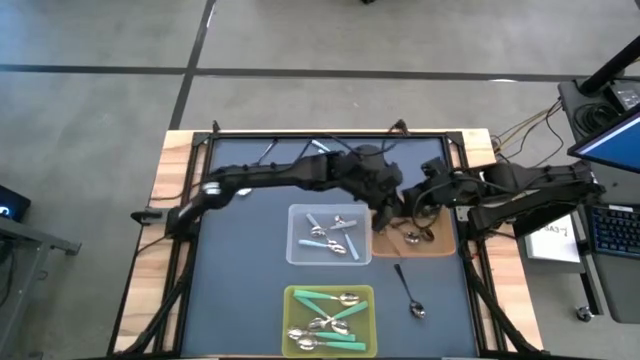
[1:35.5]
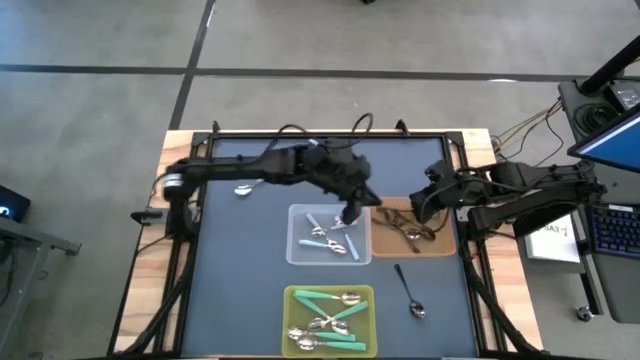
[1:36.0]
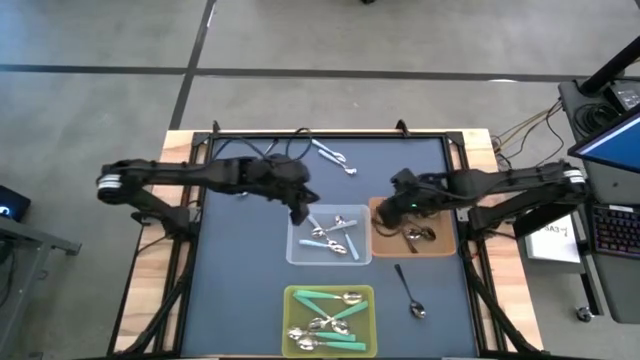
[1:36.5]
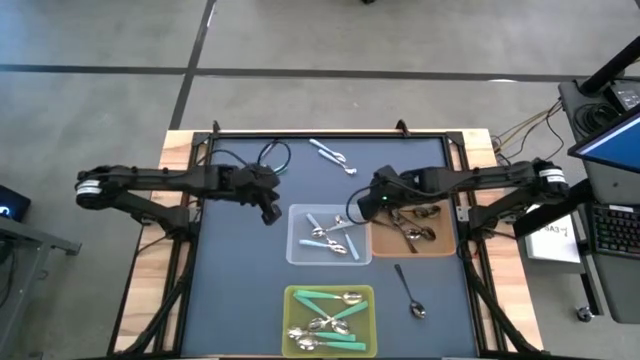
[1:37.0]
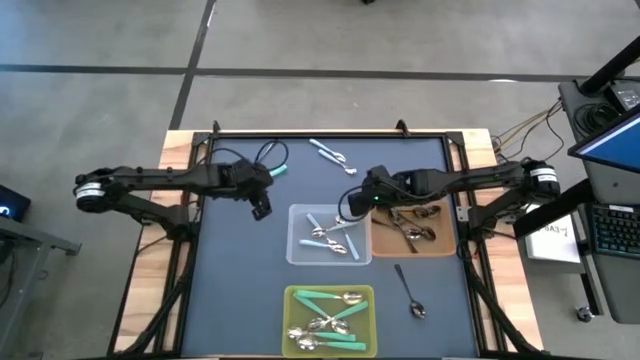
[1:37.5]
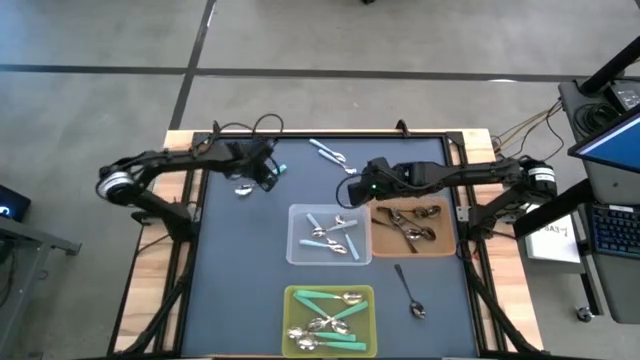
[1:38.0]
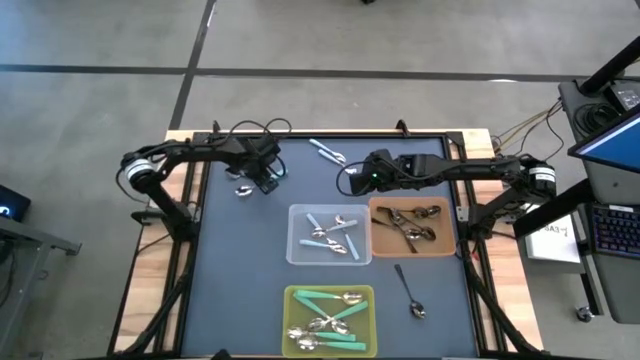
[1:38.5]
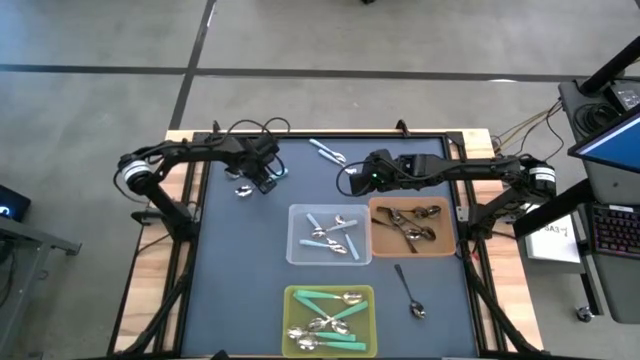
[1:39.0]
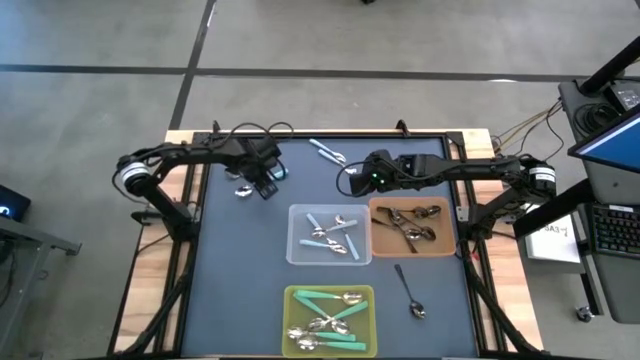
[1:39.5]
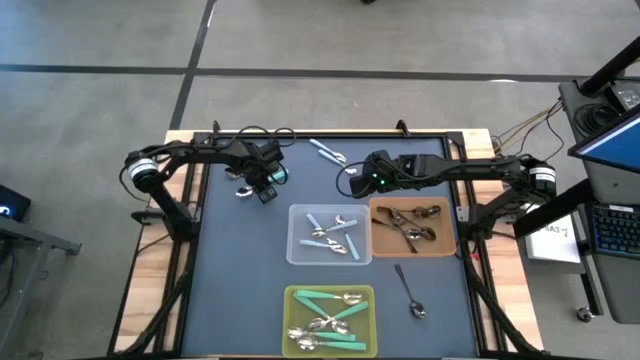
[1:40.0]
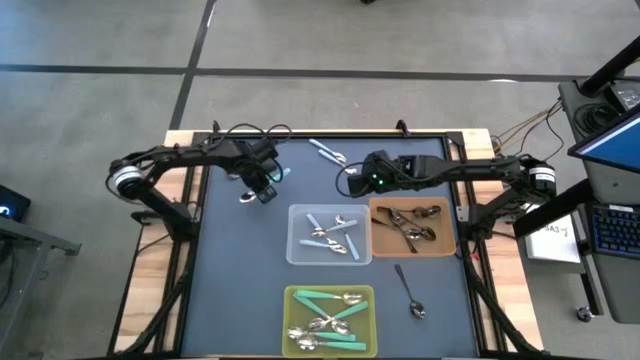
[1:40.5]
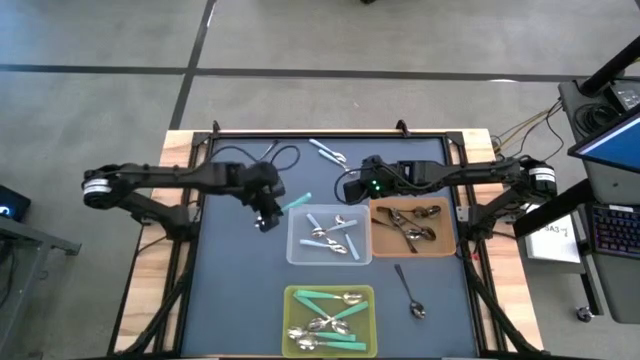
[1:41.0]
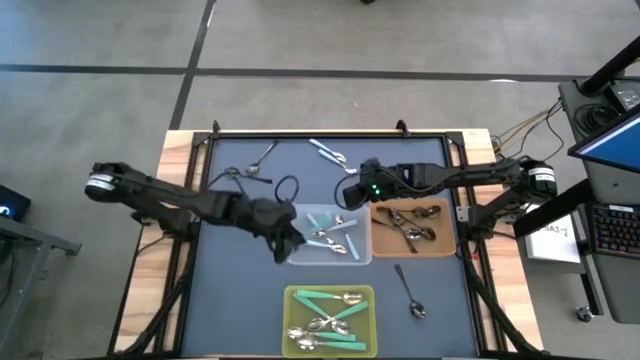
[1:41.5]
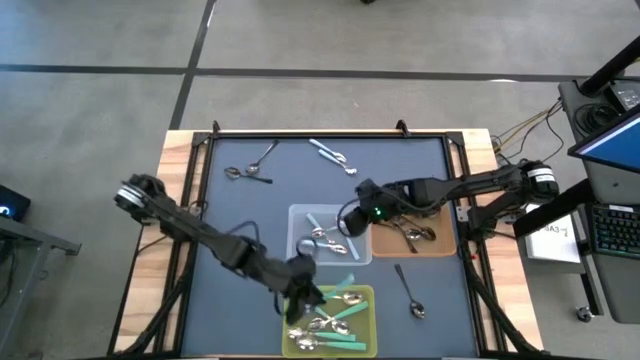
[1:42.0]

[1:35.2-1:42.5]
Task: Sort silverware by color (type)
Put the light green spoon into the yellow bin

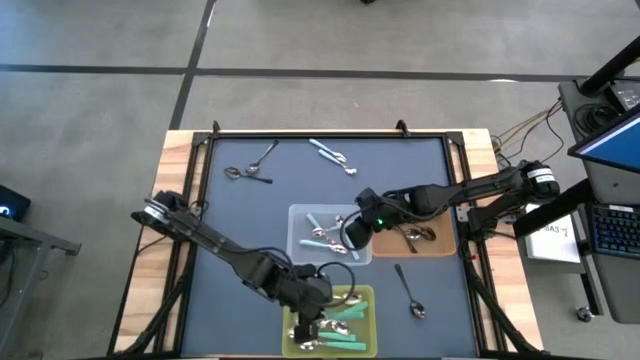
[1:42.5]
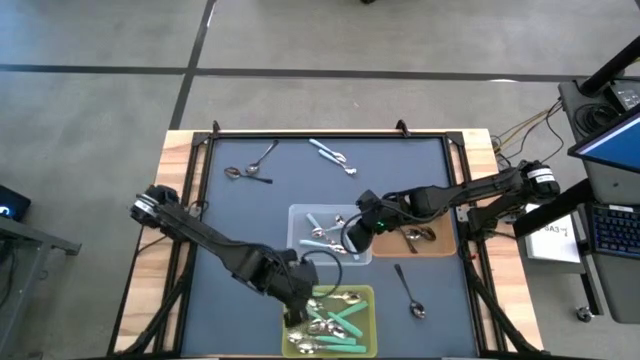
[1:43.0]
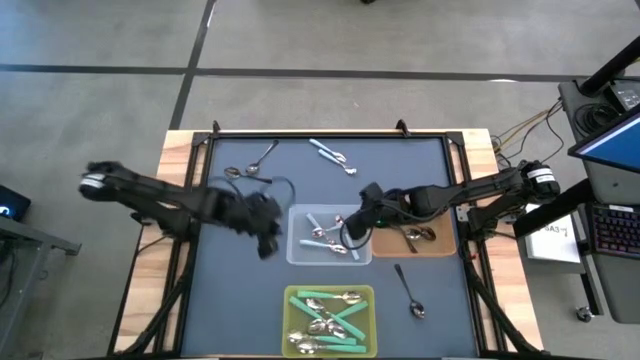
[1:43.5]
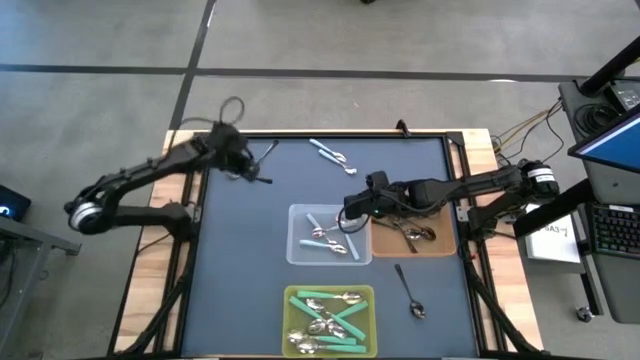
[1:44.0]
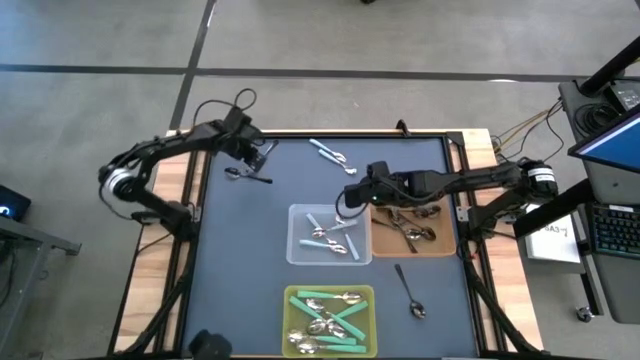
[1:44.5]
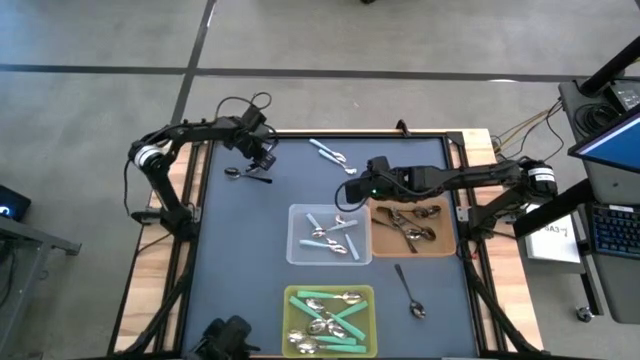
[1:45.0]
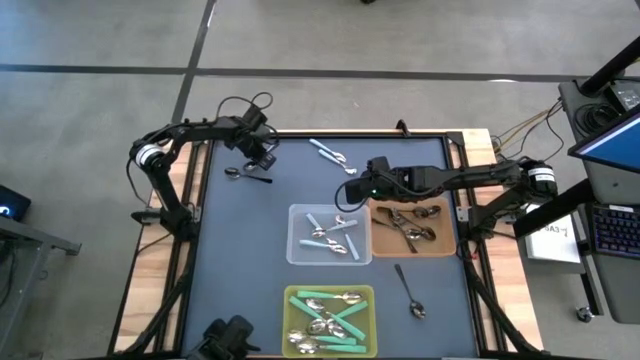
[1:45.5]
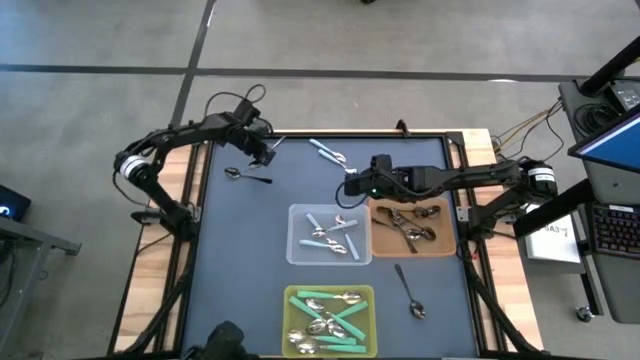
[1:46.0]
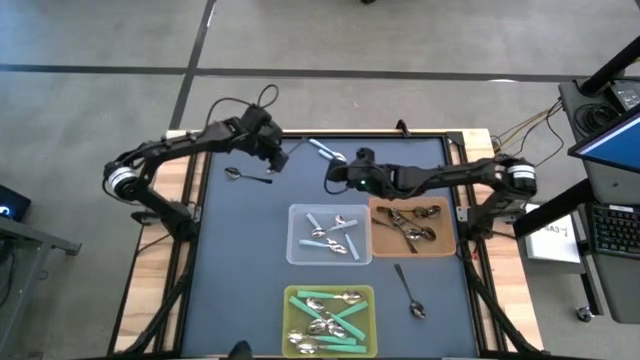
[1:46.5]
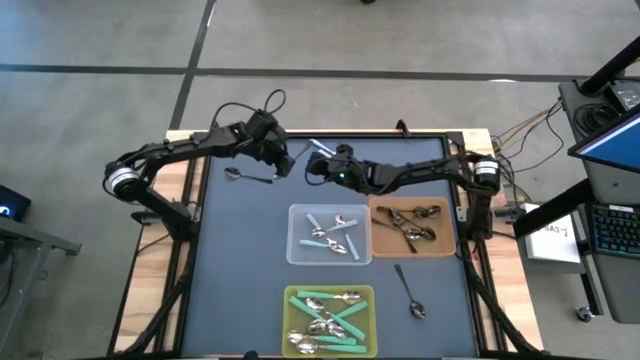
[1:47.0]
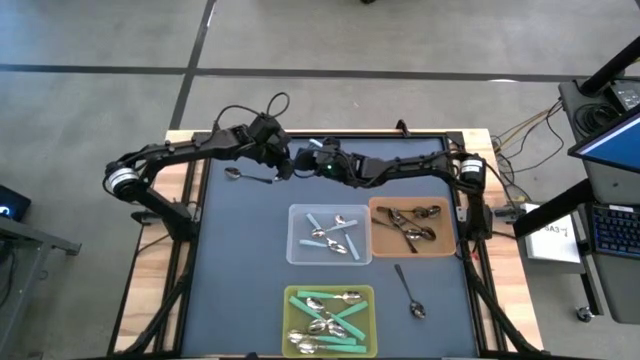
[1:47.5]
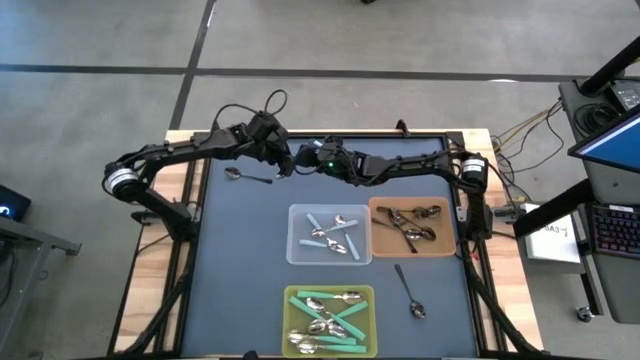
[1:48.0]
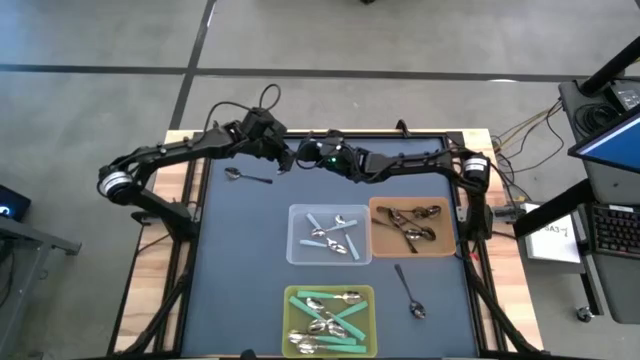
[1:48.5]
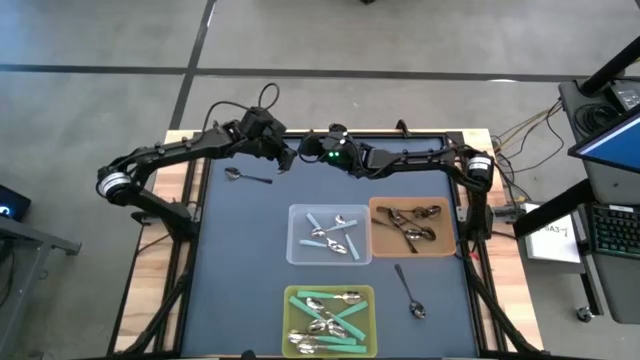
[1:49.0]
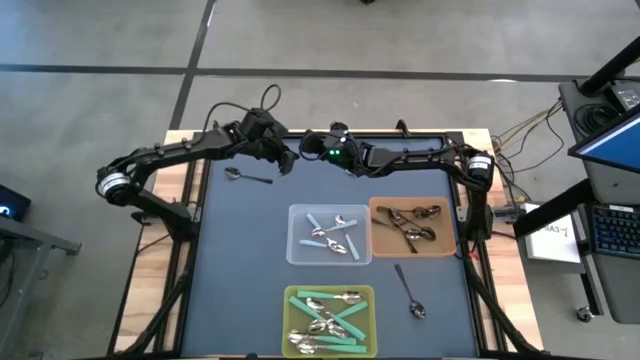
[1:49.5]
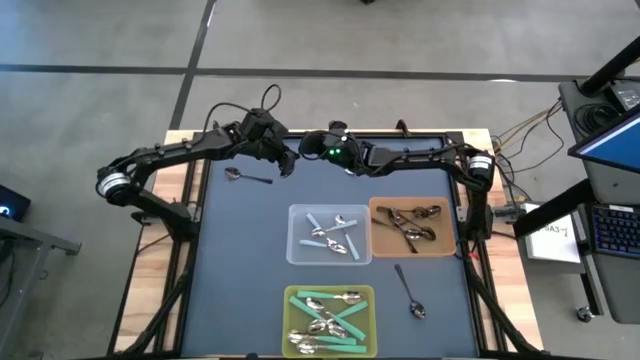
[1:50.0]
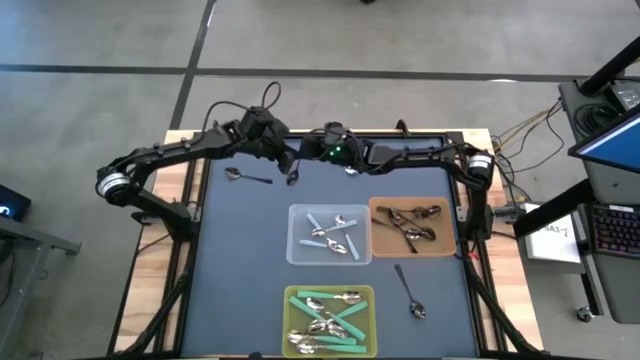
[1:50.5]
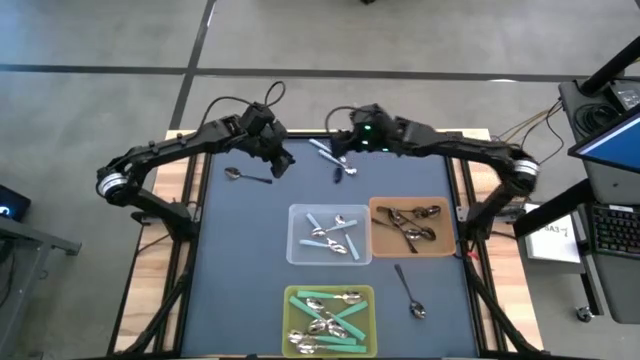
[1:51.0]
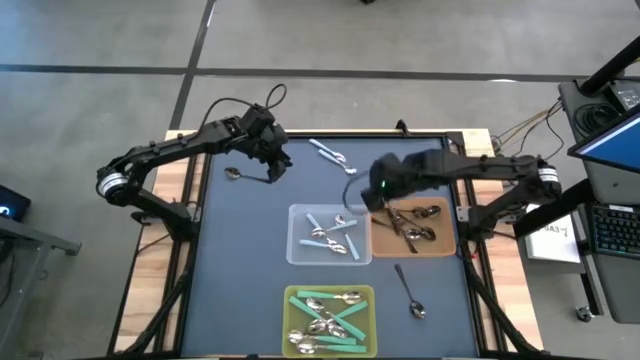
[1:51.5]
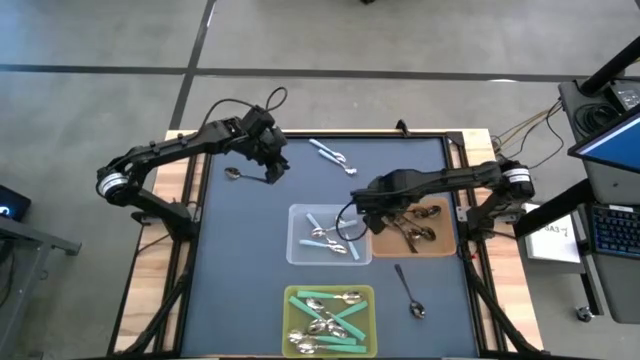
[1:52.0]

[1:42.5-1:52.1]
Put the black spoon into the orange bin

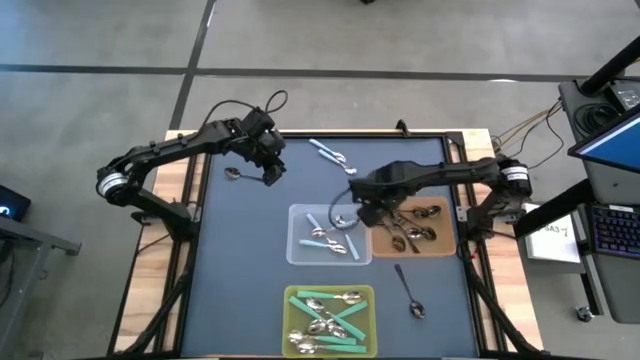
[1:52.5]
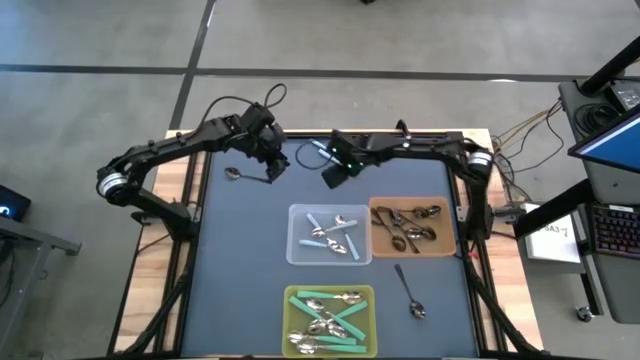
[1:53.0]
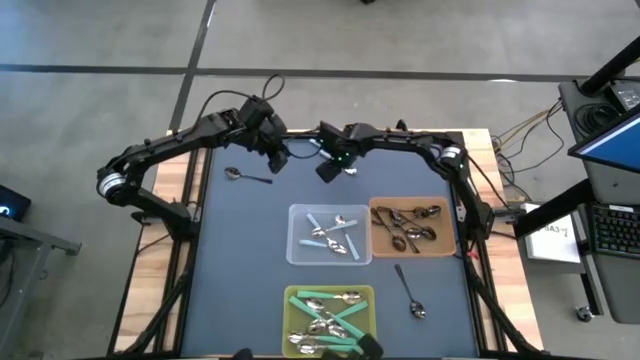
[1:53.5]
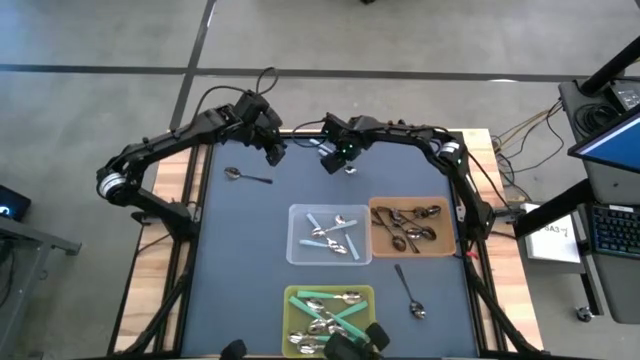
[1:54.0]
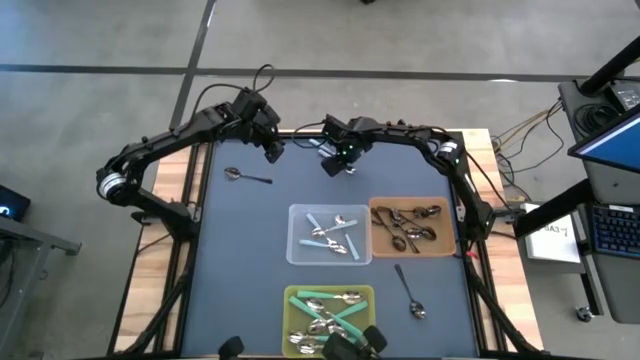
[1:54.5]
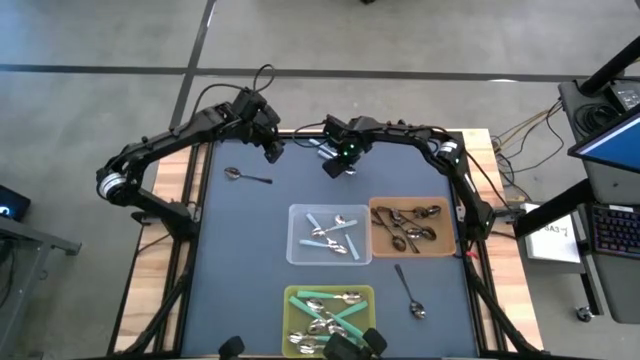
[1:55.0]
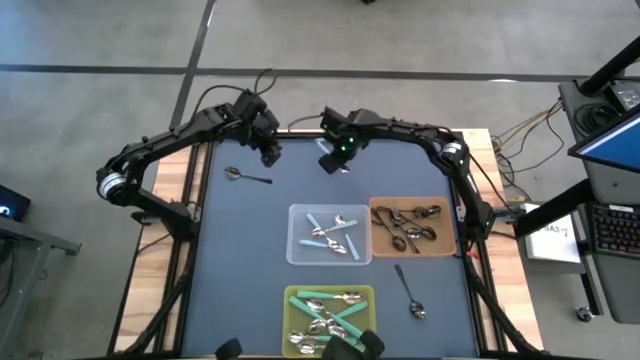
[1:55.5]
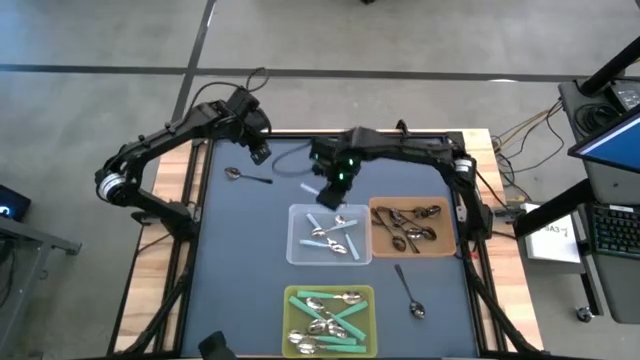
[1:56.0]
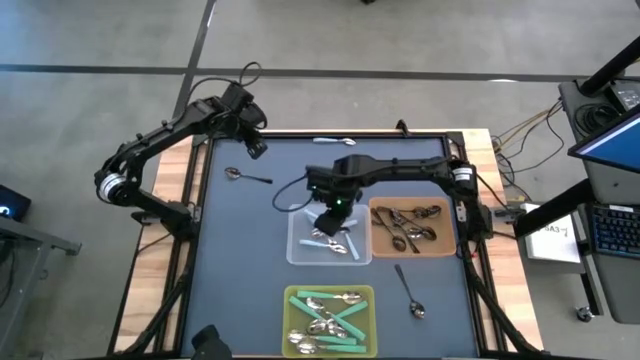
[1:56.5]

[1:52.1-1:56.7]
Put the light blue spoon into the transparent bin
